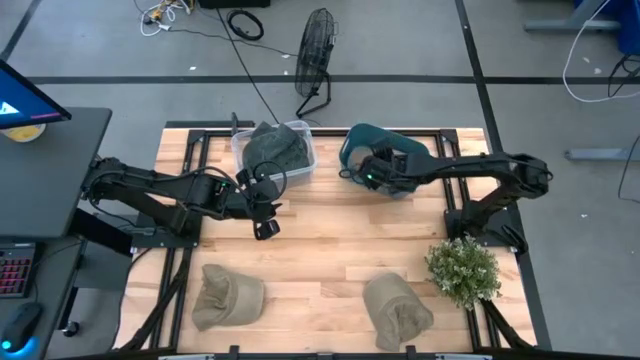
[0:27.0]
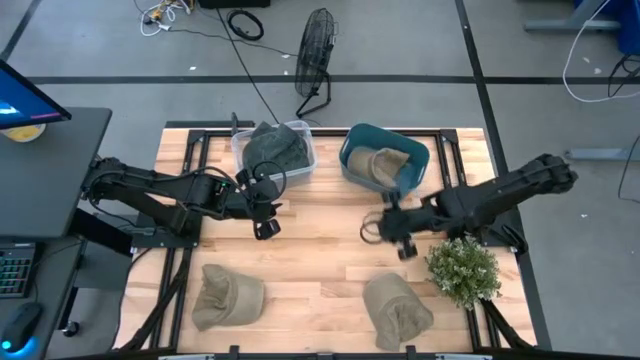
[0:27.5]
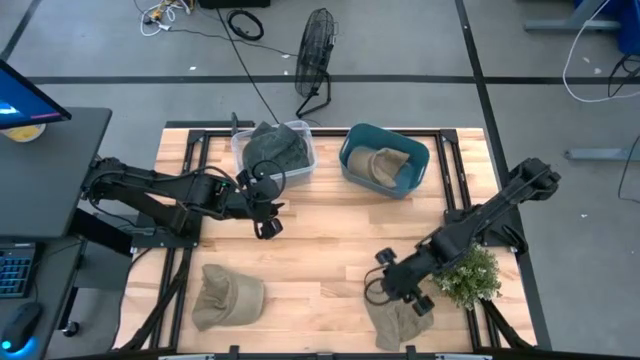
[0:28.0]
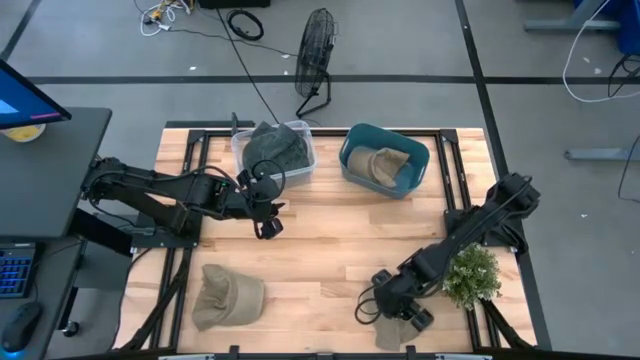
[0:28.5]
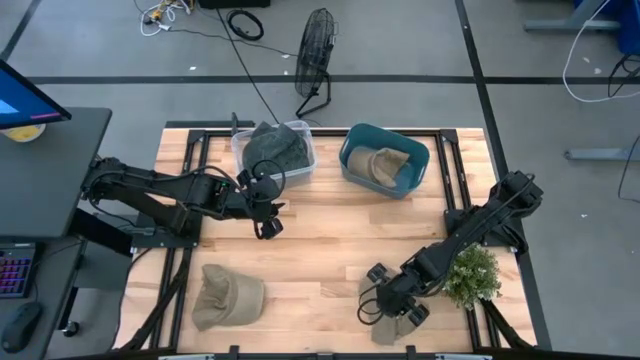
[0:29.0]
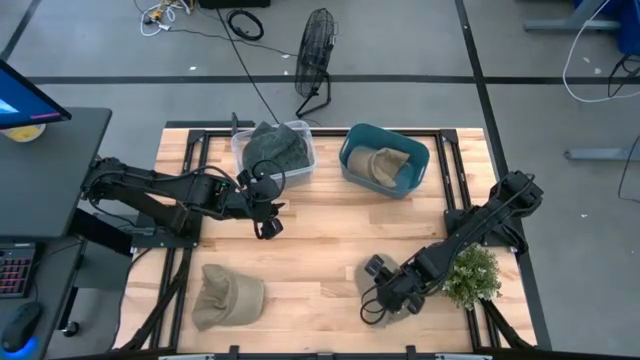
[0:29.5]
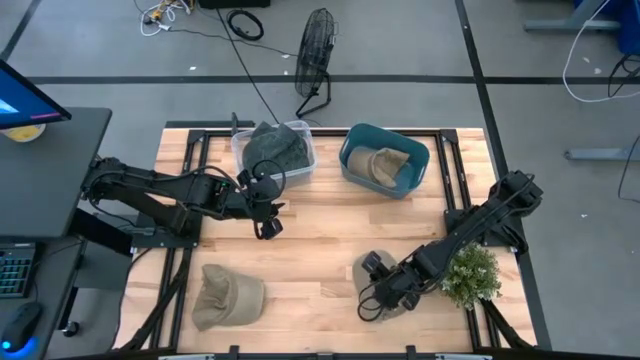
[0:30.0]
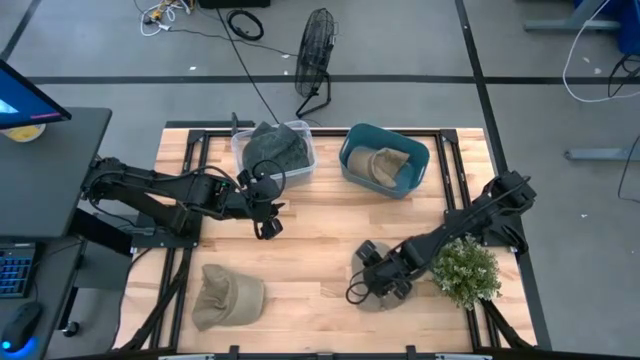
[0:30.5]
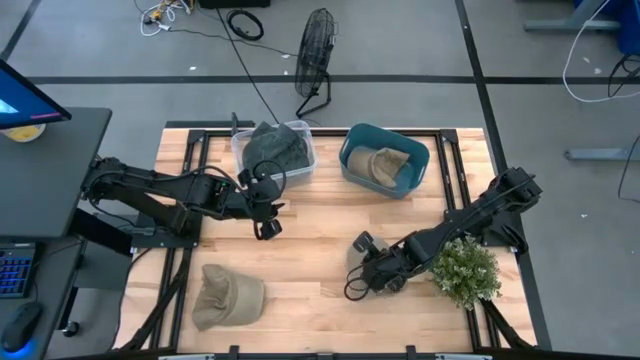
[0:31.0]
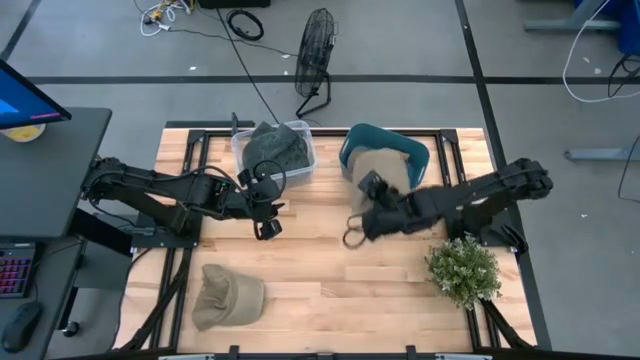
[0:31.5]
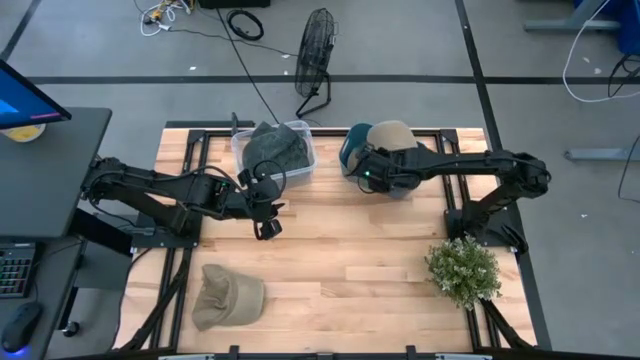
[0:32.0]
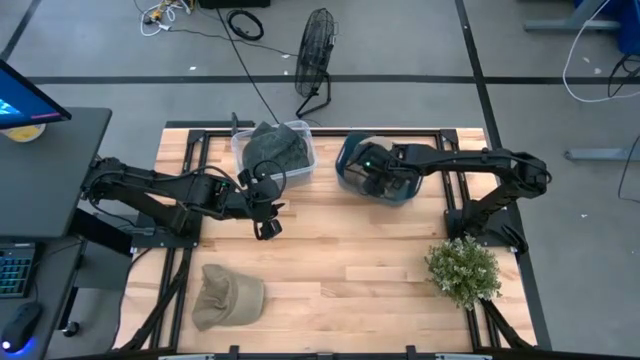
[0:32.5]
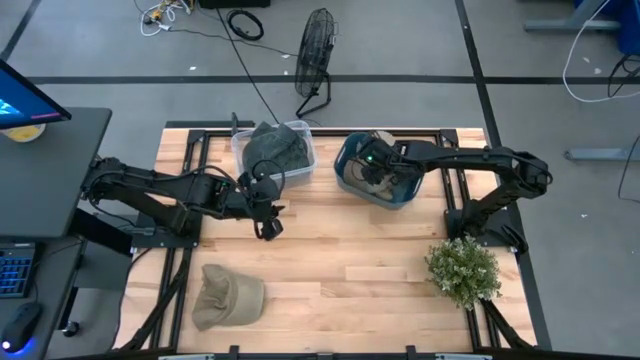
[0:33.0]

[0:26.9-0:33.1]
Task: Pick & Place hat
Put the right brown cap into the blue bin

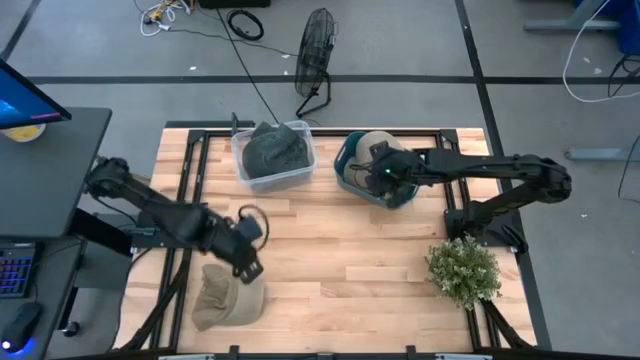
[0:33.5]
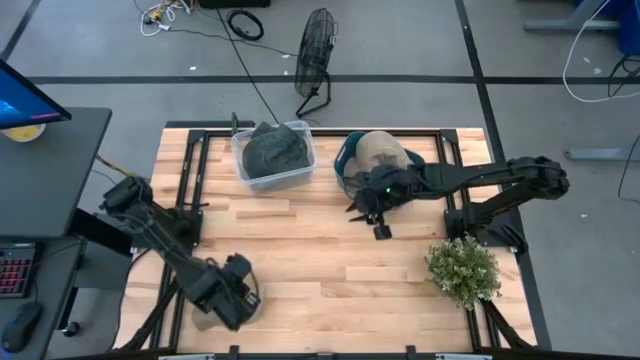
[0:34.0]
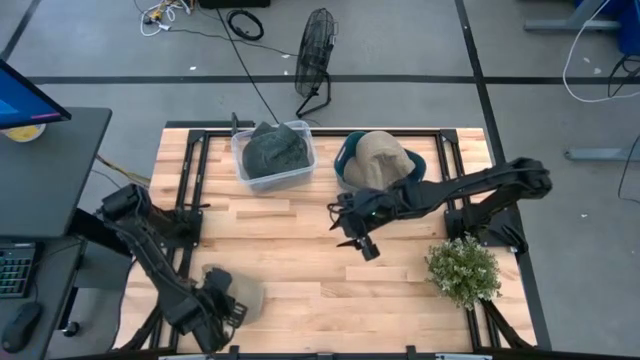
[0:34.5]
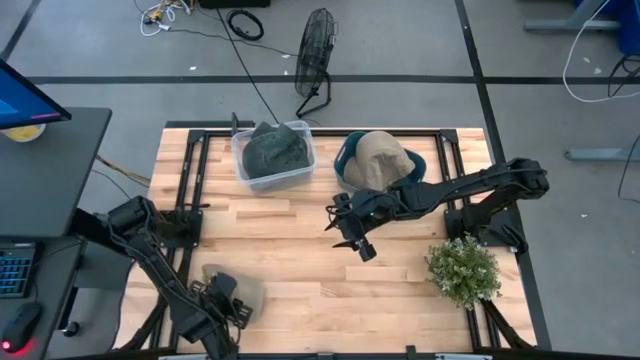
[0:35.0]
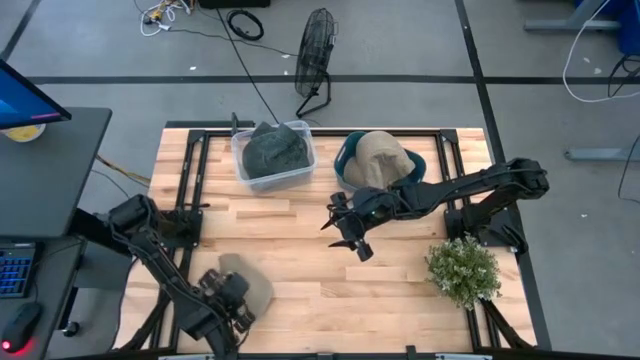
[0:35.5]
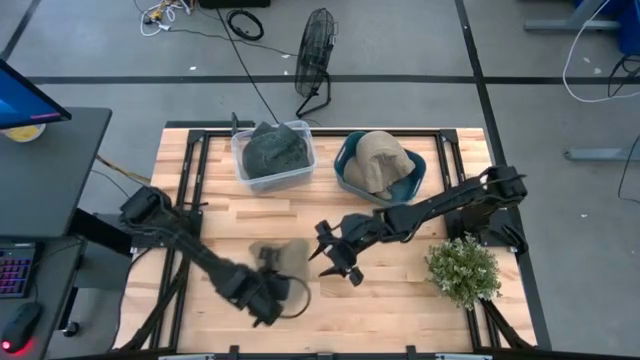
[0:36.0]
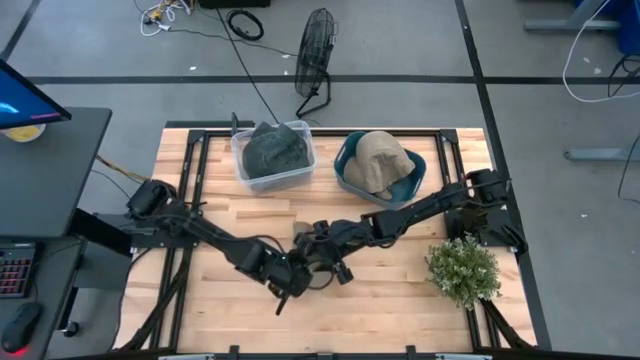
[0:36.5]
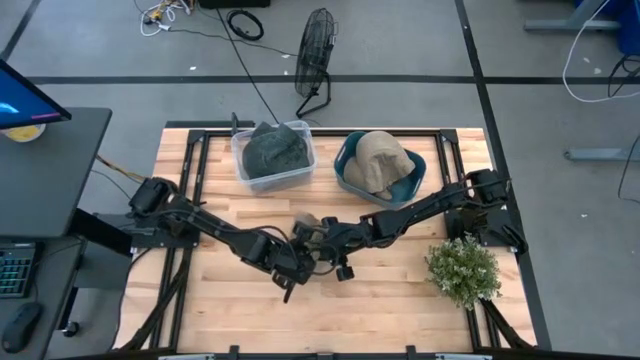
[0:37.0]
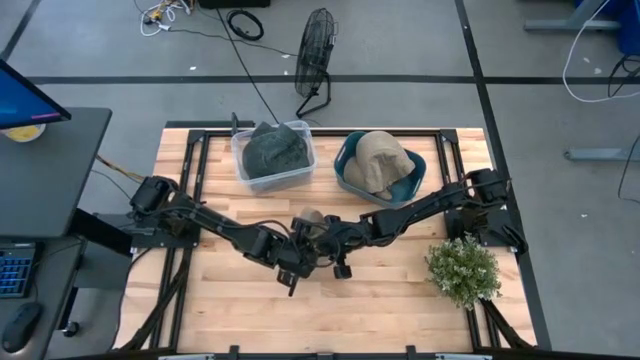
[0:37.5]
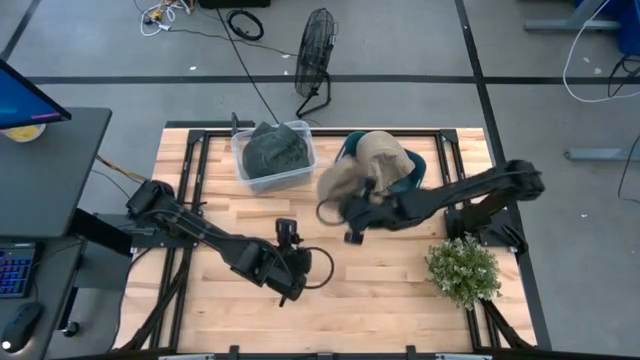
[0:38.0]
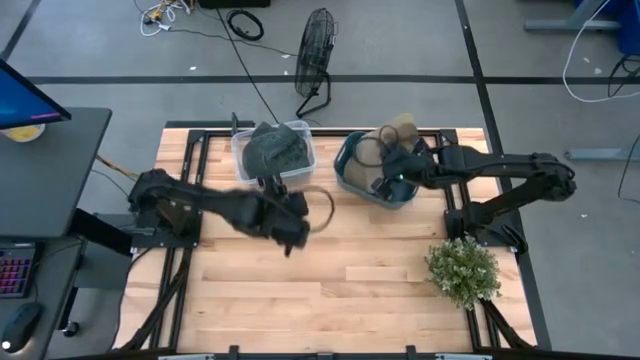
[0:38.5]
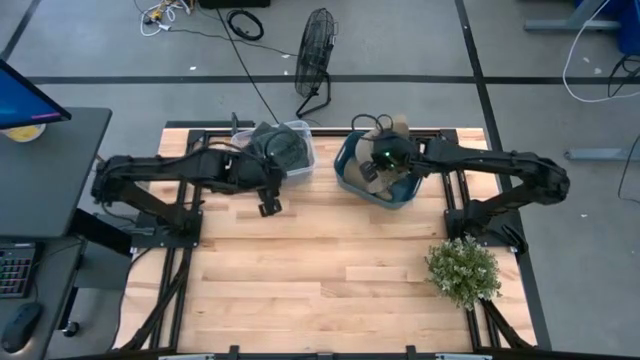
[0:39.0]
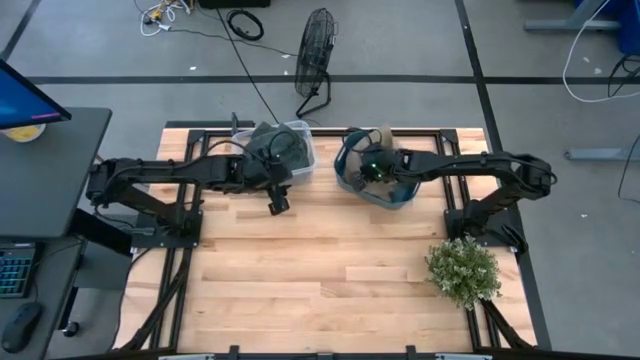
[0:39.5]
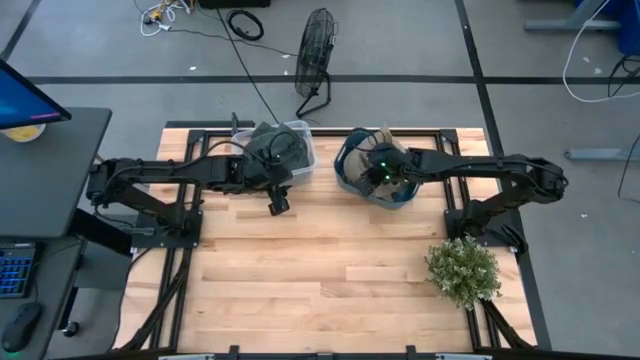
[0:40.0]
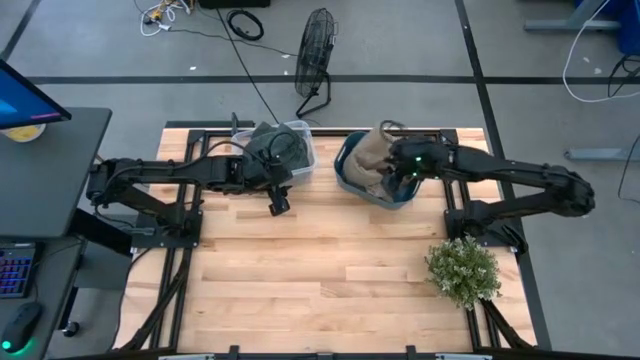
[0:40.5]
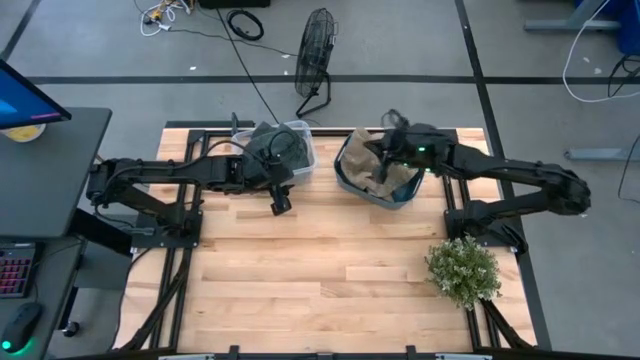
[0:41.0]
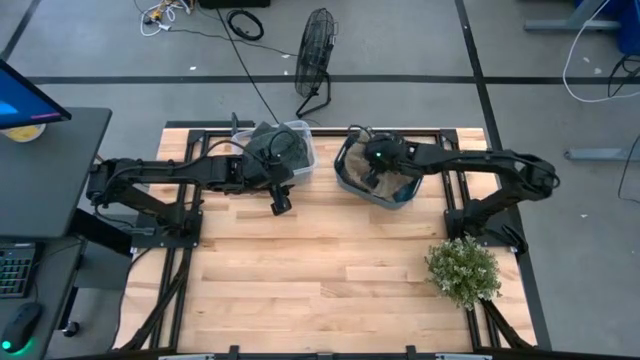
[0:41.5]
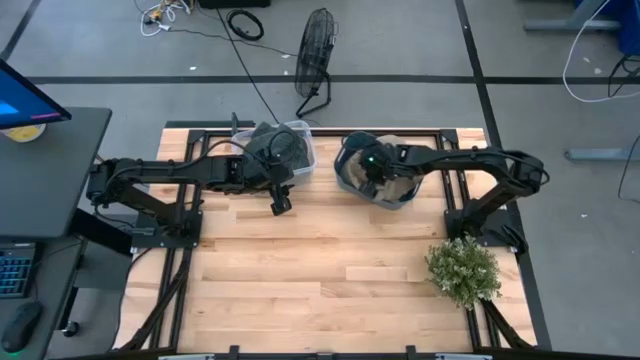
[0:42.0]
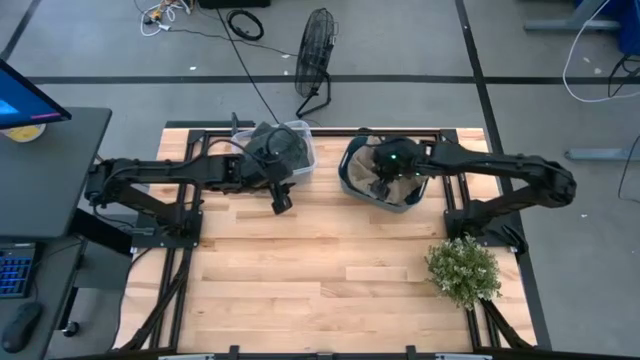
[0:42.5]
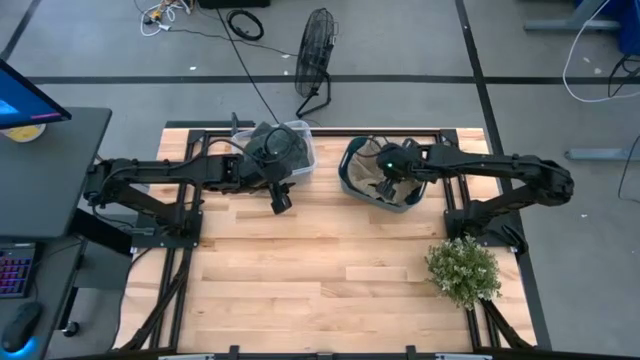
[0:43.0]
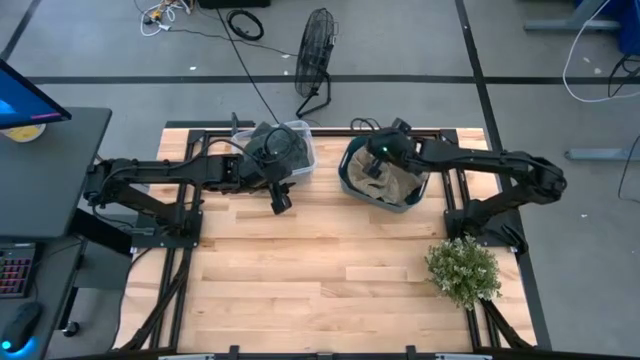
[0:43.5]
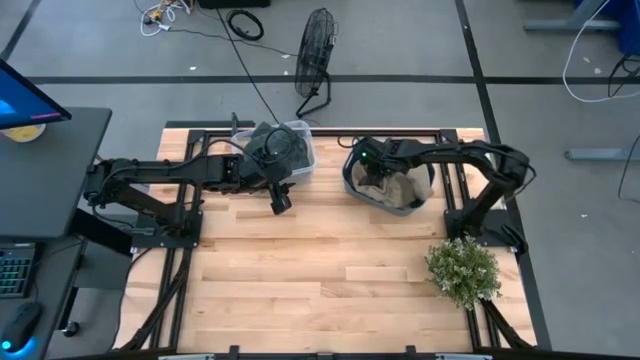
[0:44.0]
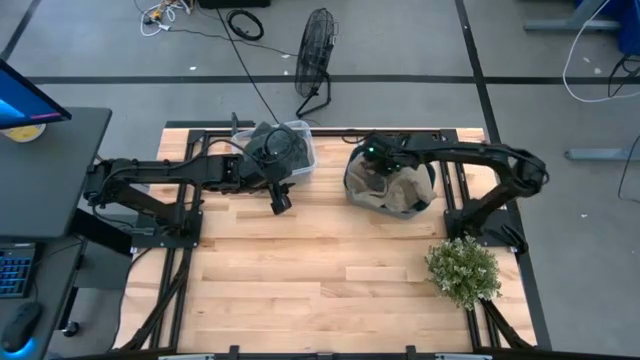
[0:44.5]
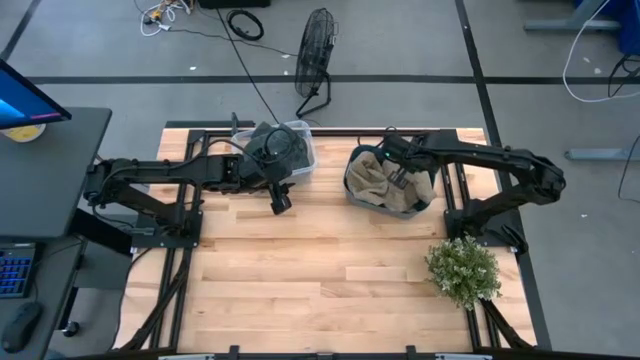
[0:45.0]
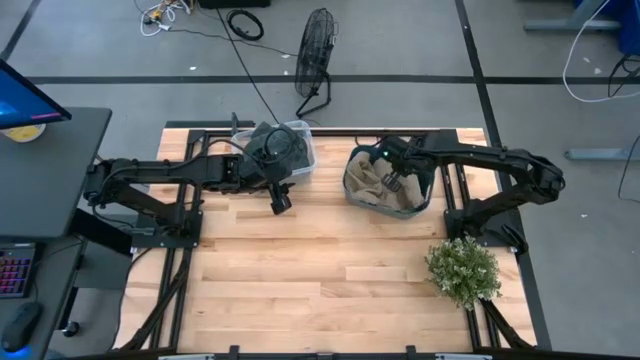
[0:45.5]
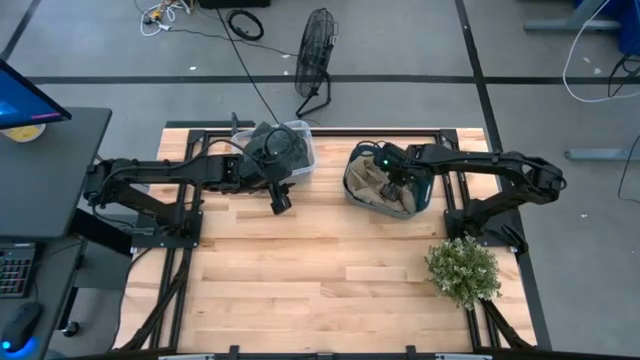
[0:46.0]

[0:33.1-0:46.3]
Put the brown cap into the blue bin

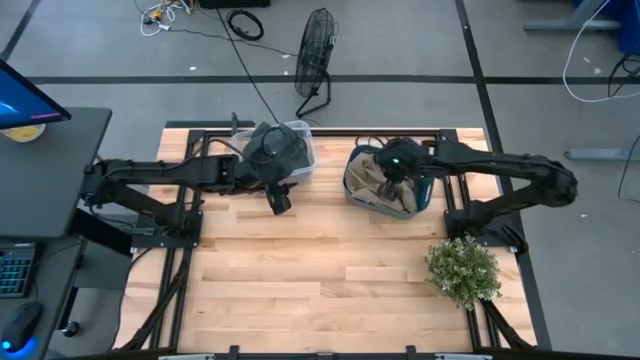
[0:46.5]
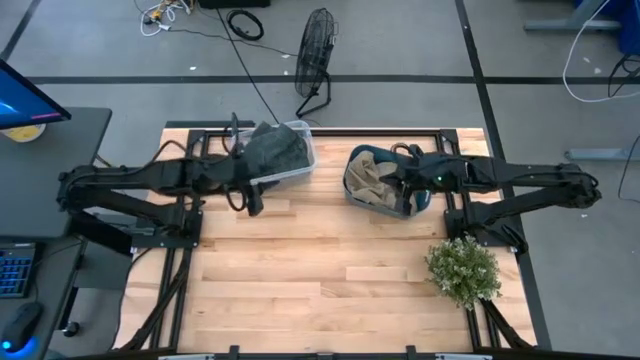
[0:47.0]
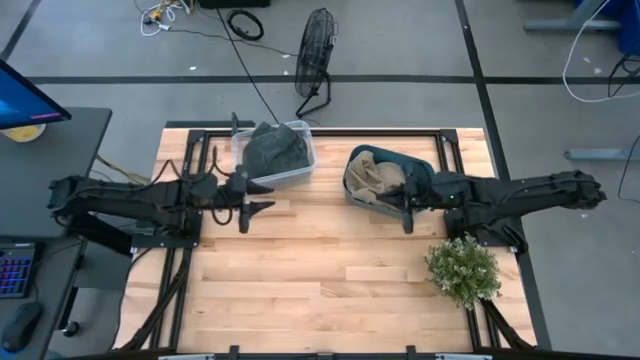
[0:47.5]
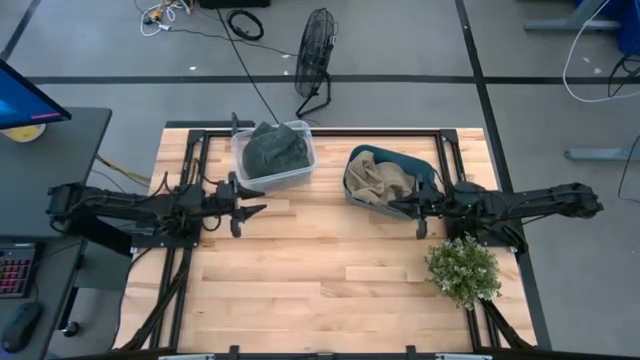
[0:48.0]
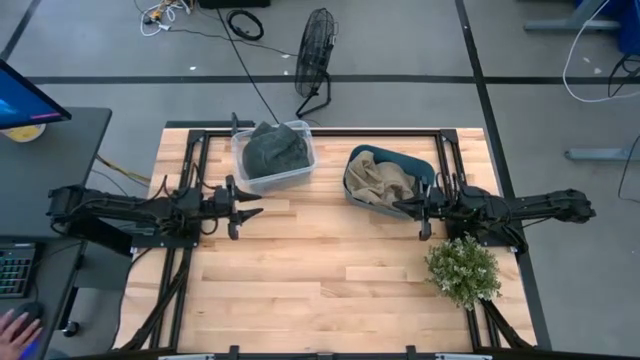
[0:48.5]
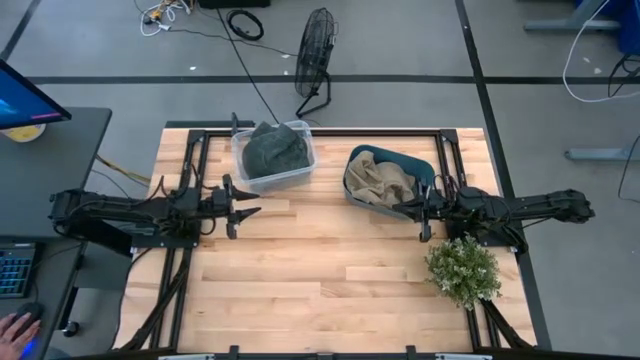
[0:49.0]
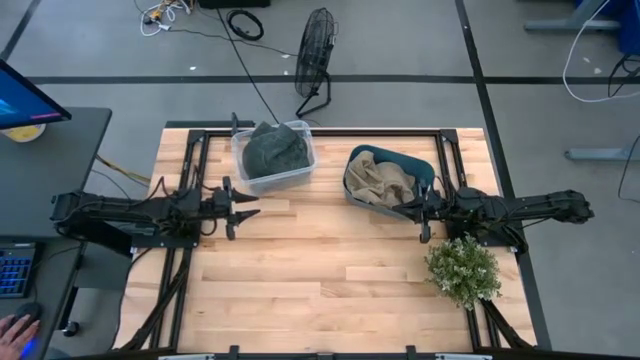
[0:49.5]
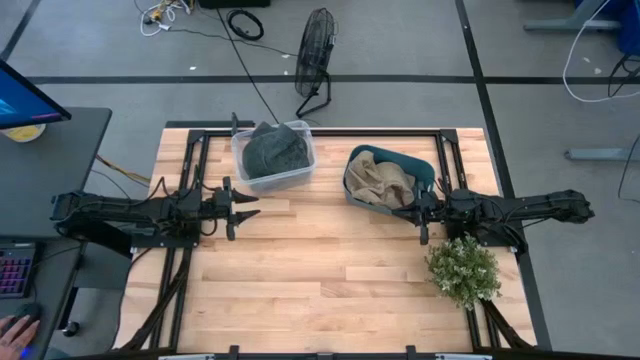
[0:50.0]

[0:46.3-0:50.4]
Return to Home Position
